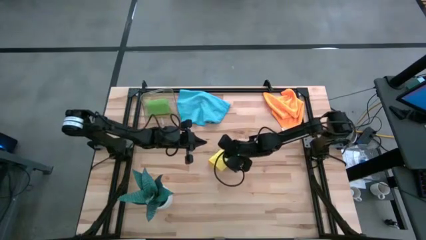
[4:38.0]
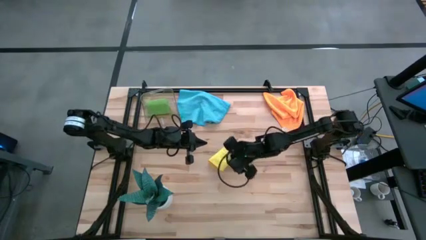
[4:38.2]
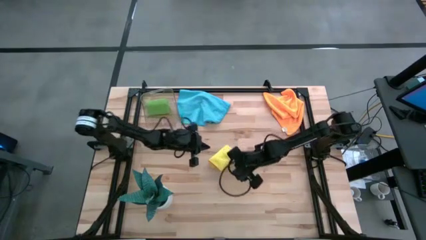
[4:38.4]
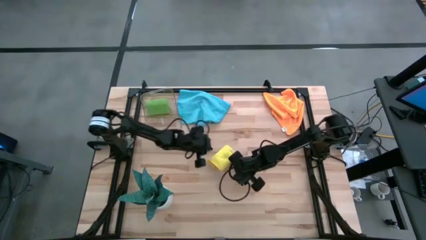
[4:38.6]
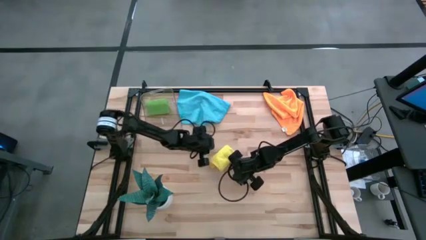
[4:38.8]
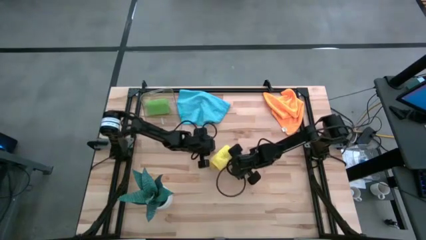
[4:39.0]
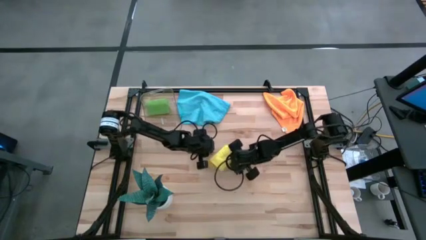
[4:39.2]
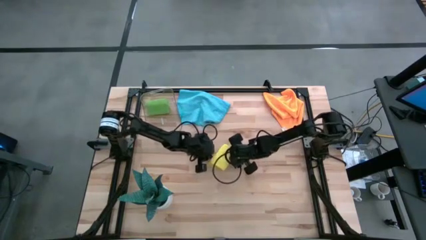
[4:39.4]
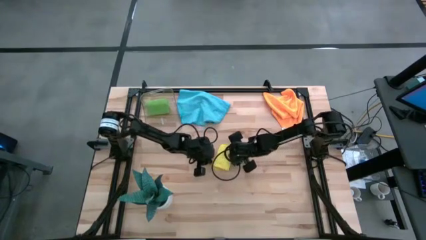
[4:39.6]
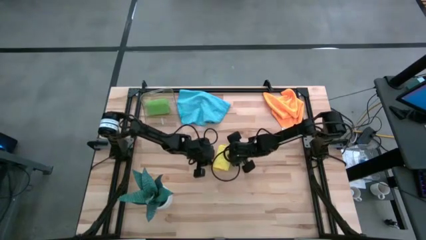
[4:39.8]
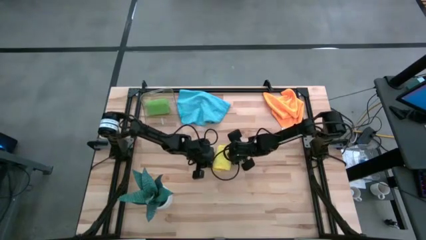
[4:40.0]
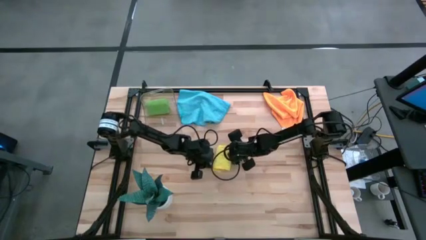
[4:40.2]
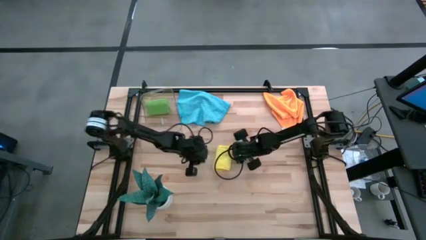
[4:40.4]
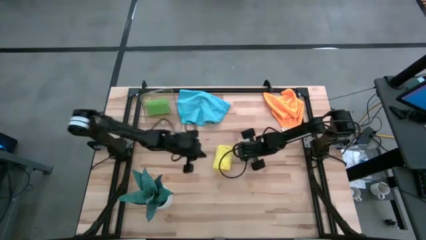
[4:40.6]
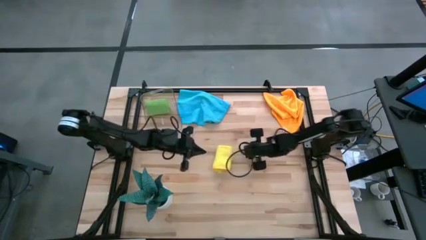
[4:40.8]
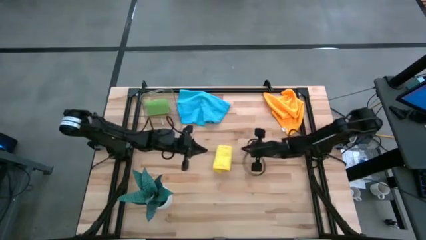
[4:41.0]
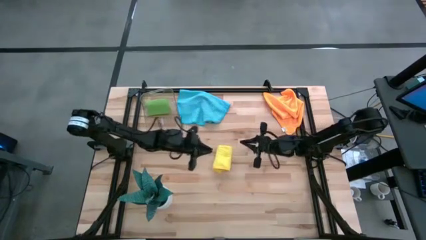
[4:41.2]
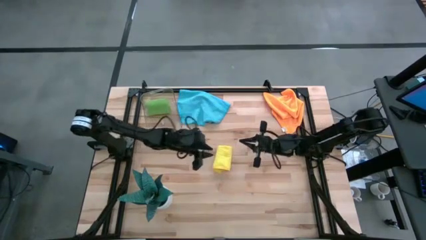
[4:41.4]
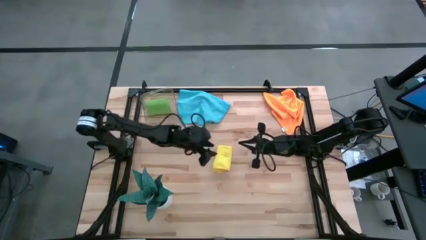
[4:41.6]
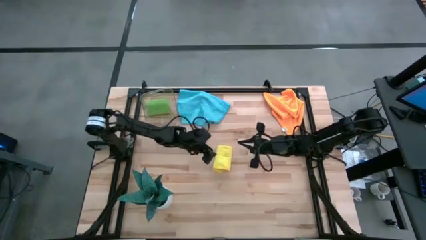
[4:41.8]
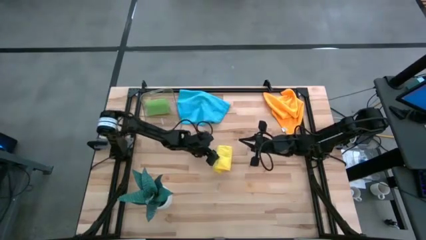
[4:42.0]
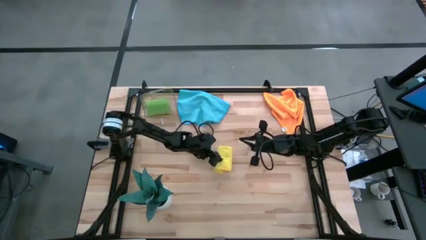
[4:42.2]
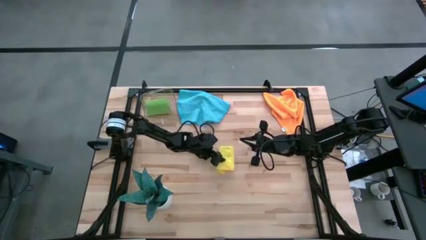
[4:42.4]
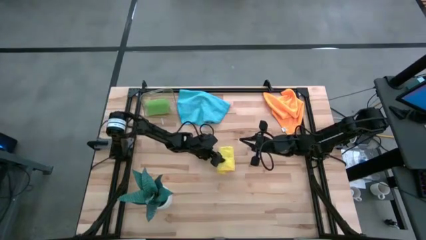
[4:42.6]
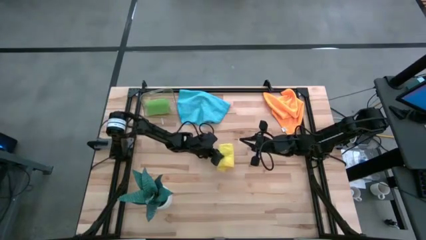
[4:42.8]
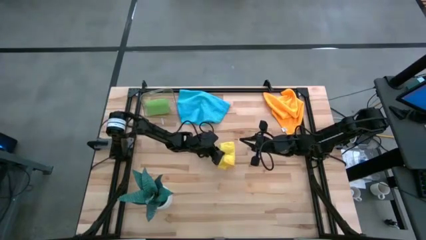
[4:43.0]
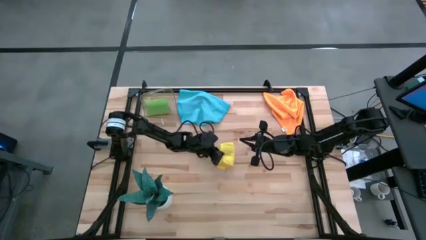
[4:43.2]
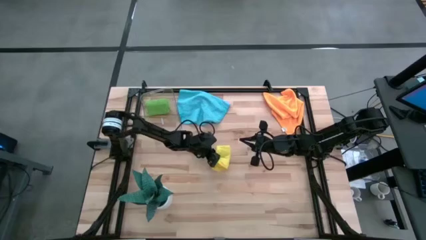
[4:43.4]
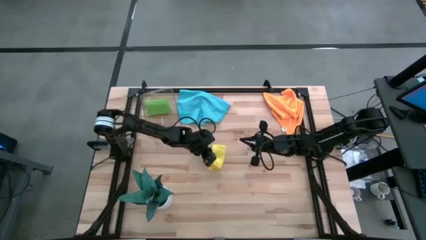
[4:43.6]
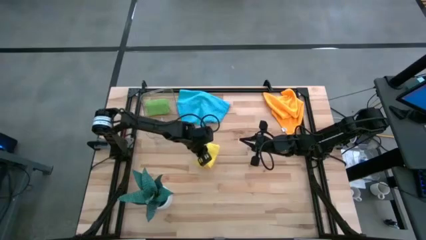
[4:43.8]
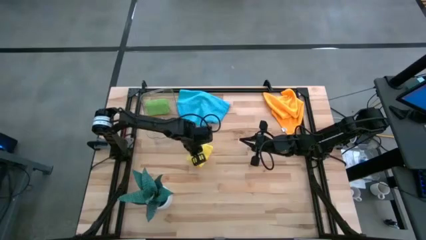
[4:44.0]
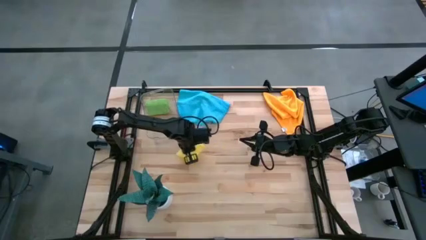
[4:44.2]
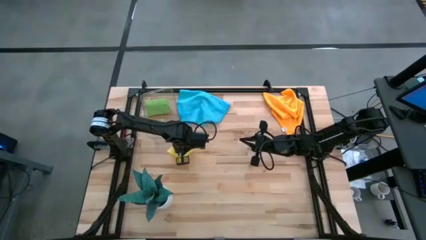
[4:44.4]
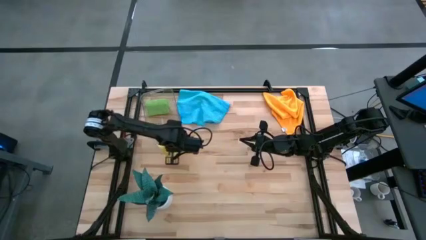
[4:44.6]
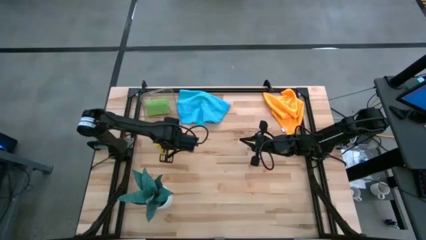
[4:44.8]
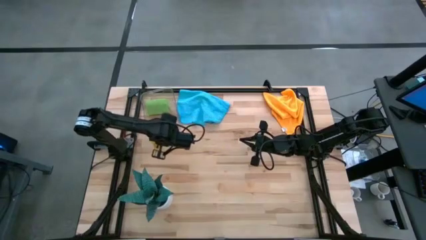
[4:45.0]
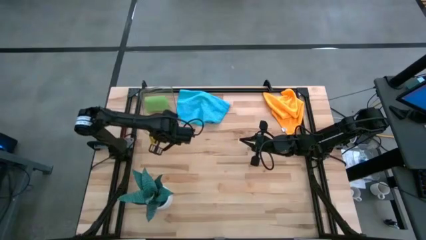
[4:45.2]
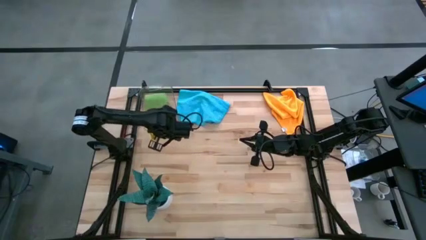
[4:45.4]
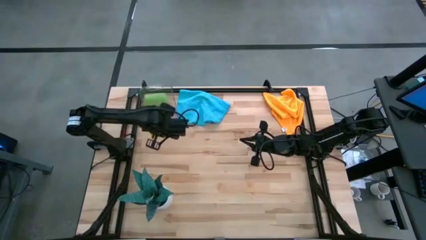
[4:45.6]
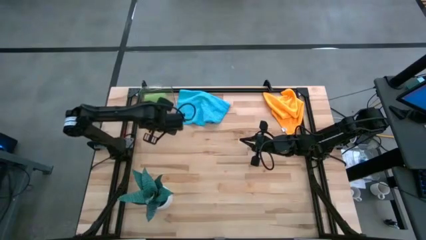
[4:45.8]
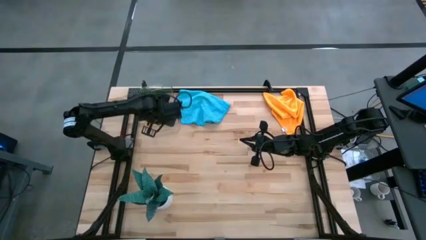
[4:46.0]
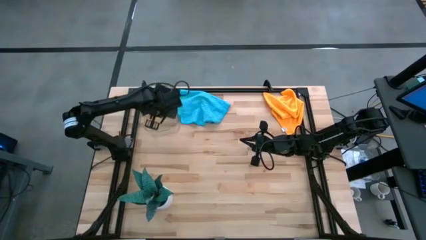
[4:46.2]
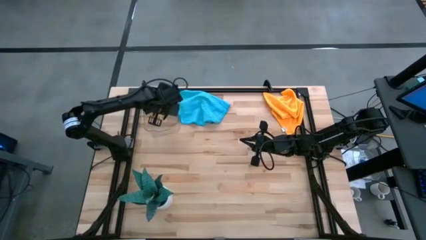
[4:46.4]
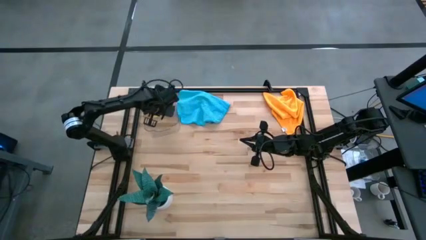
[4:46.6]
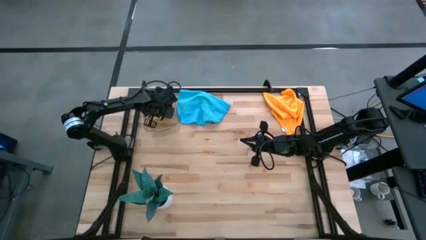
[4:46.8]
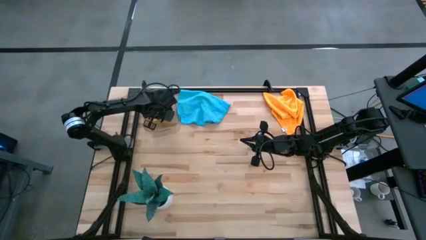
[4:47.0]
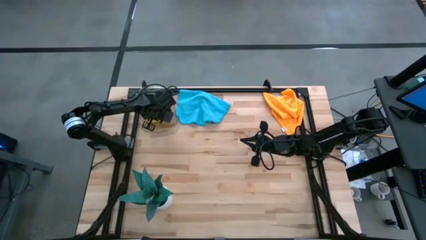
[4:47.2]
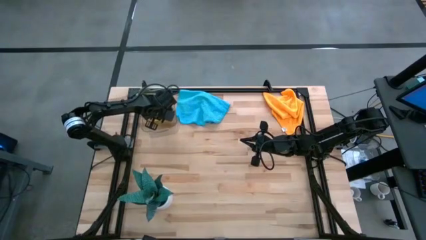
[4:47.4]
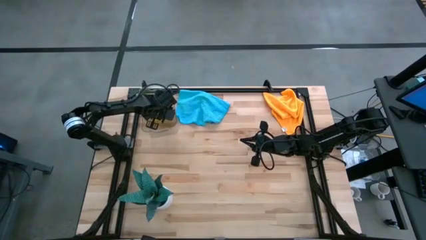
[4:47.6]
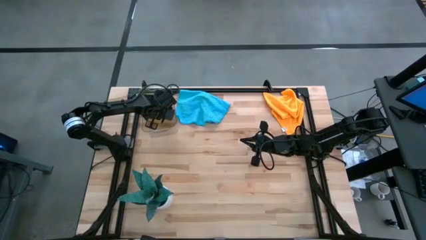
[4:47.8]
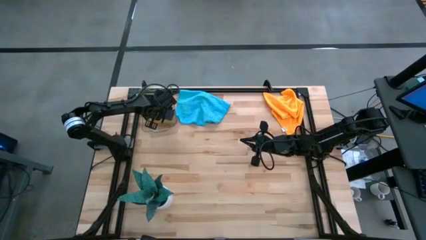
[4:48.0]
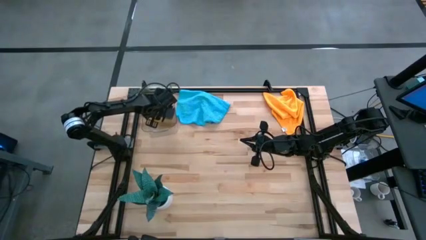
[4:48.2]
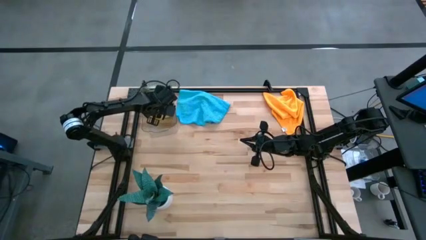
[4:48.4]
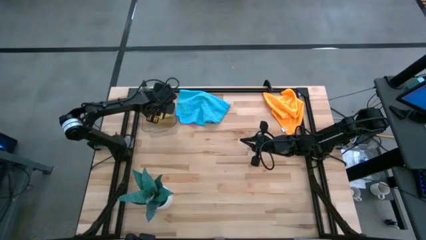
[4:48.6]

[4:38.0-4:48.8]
Task: Roll microfiber towels into tight, uniform cylinder then place into a basket
Put the rolled yellow microfiber towel into the transparent bin

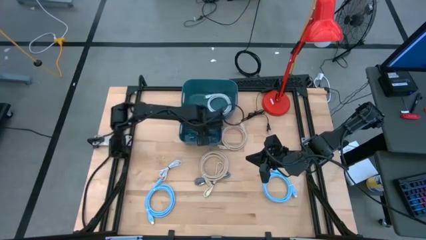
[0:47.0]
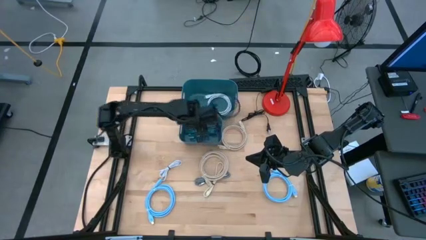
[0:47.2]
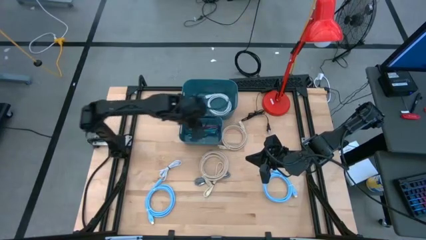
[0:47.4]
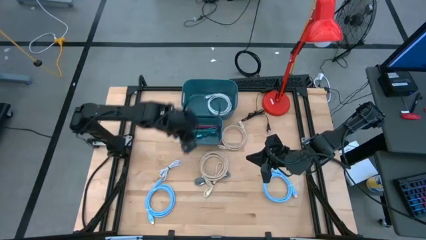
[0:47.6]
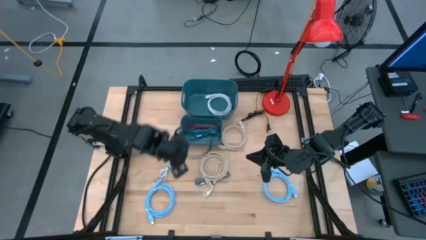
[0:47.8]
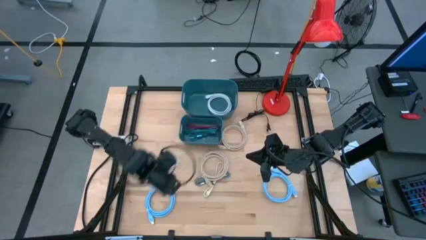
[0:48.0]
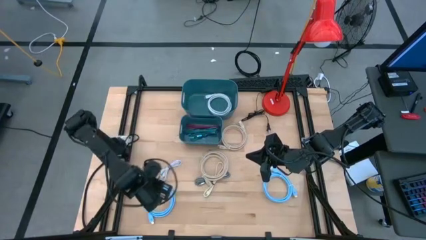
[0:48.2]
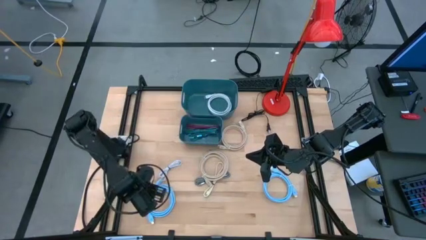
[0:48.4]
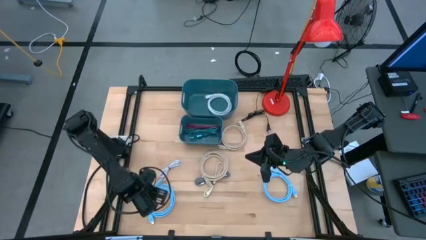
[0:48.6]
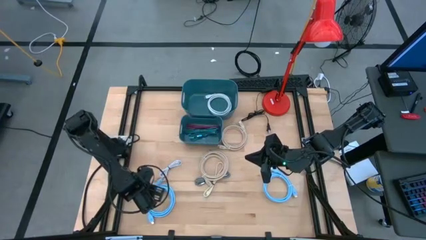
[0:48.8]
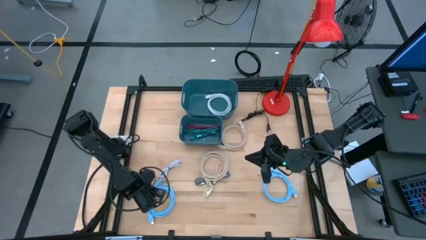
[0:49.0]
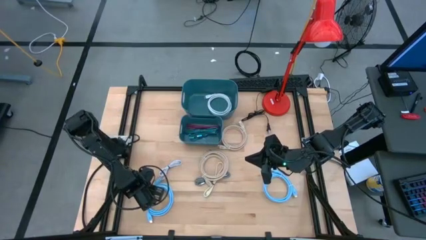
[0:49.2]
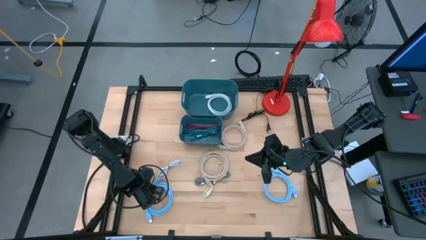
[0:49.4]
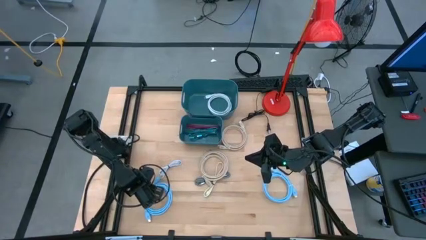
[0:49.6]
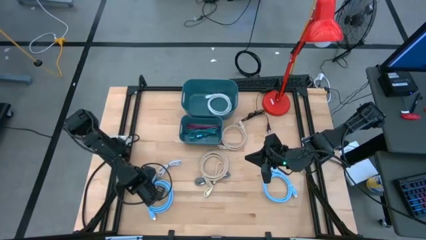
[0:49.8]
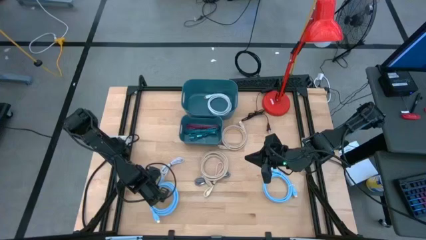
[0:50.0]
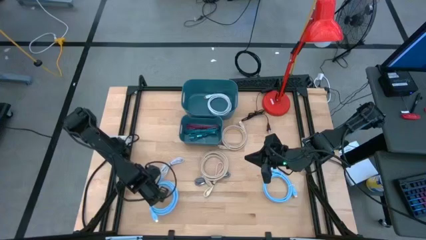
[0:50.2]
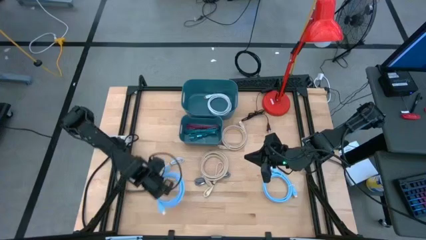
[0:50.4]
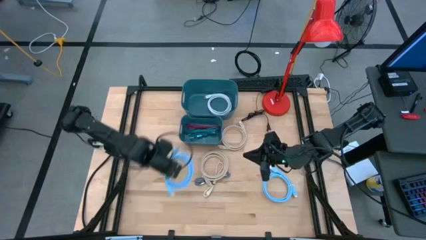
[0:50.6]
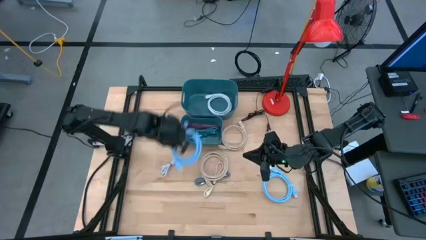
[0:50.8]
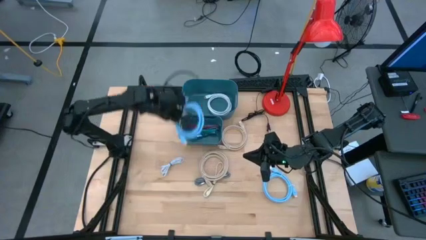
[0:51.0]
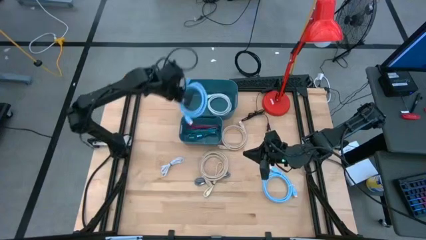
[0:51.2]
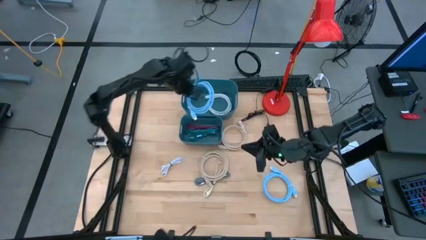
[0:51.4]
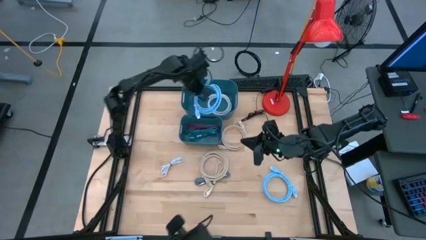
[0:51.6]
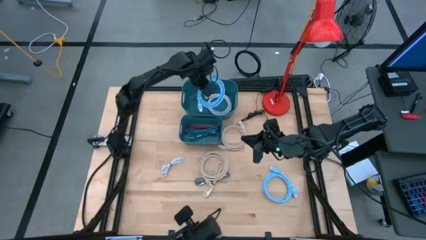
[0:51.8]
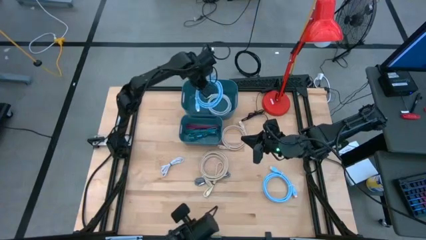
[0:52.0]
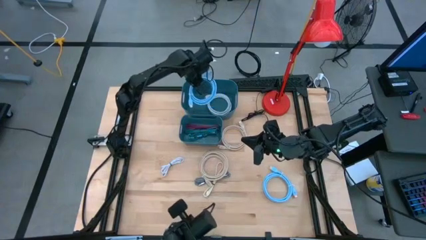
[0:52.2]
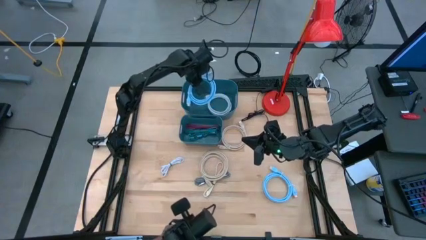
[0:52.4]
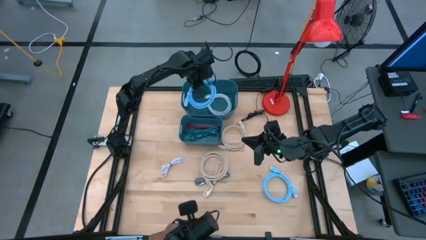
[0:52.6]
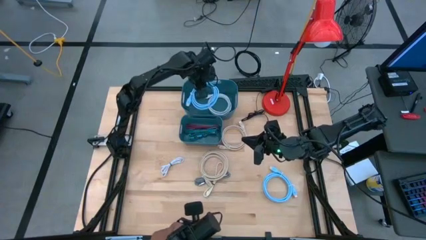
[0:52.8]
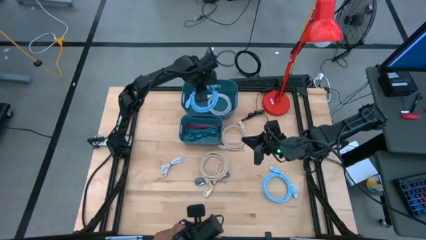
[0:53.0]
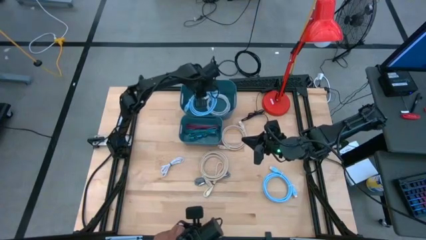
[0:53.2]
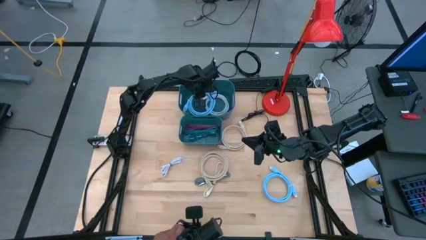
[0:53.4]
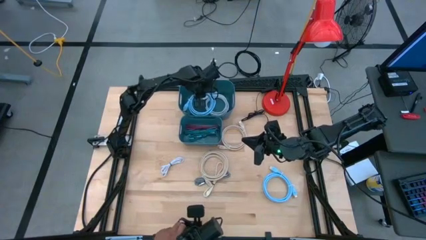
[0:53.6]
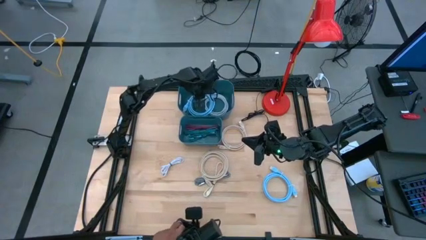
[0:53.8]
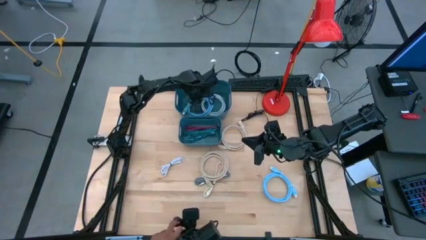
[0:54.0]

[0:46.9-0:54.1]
Task: Pick & Place USB Port
Put the left blue HDMI cable into the top blue bin
